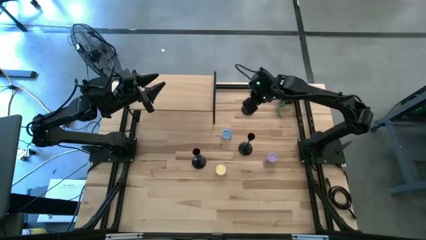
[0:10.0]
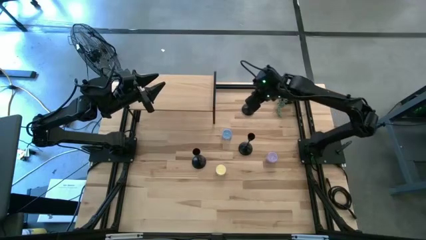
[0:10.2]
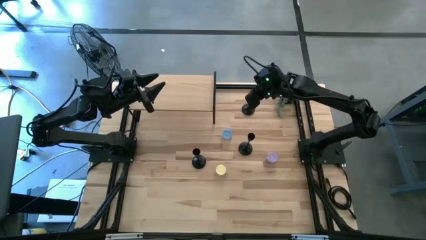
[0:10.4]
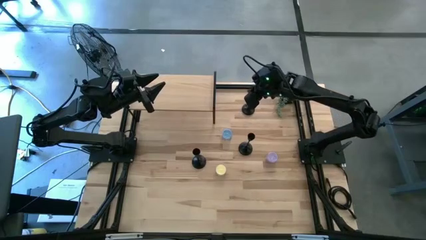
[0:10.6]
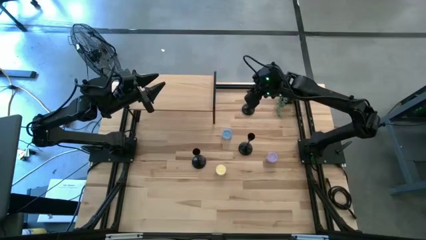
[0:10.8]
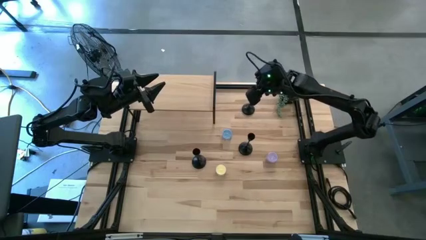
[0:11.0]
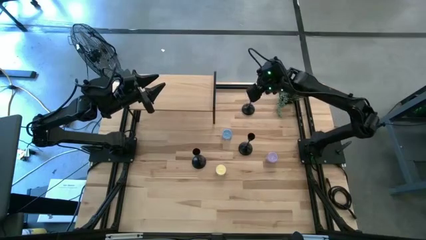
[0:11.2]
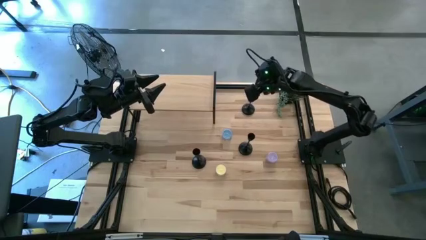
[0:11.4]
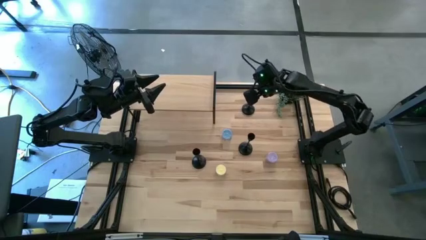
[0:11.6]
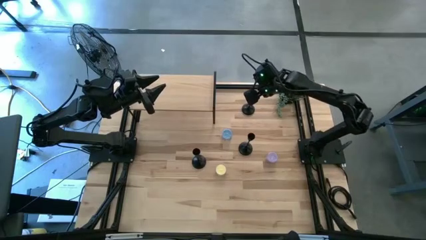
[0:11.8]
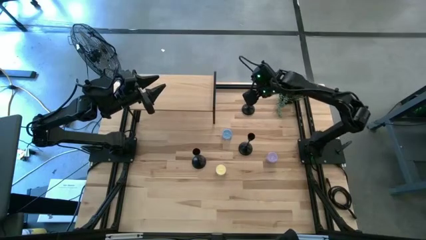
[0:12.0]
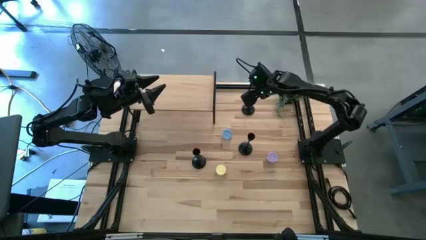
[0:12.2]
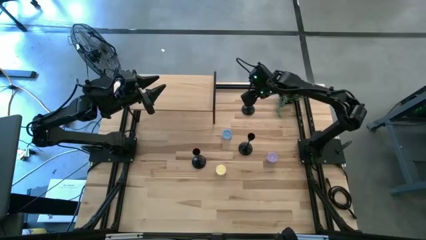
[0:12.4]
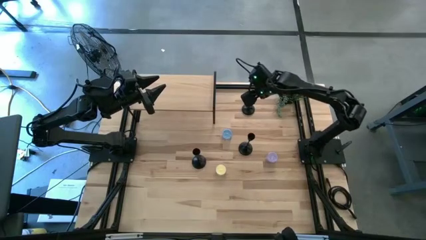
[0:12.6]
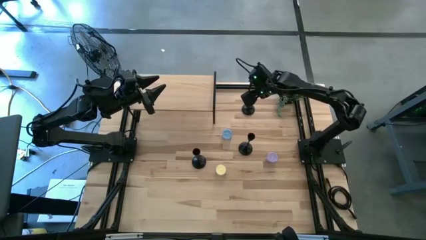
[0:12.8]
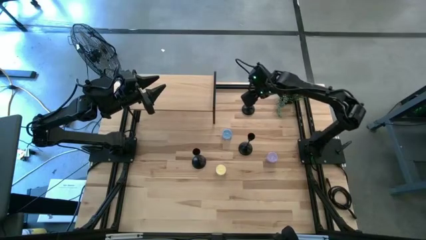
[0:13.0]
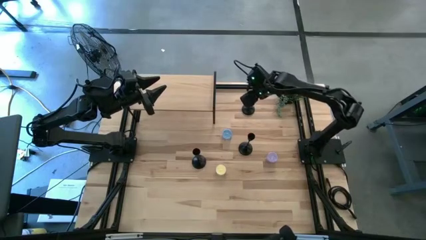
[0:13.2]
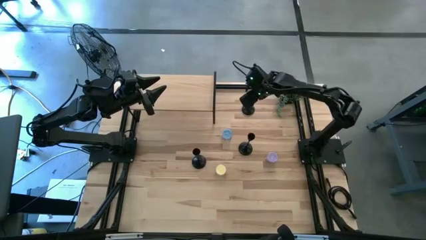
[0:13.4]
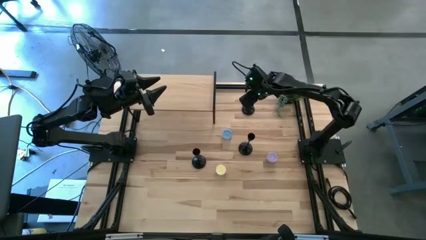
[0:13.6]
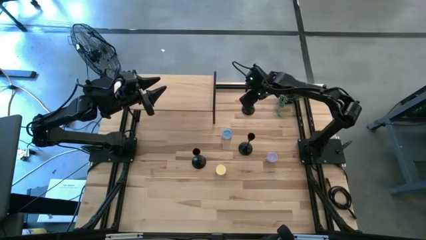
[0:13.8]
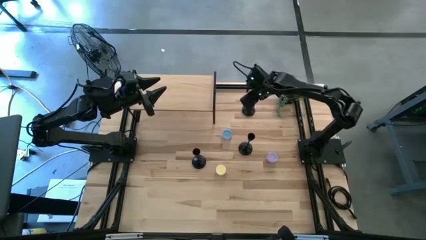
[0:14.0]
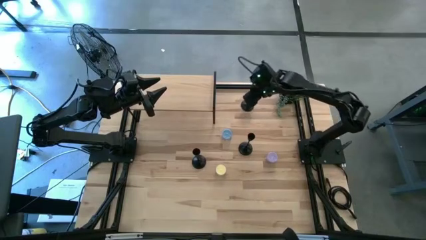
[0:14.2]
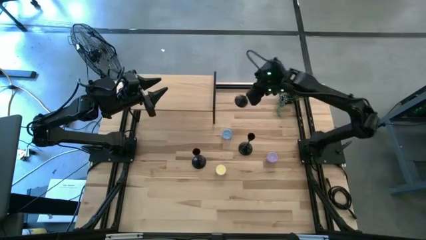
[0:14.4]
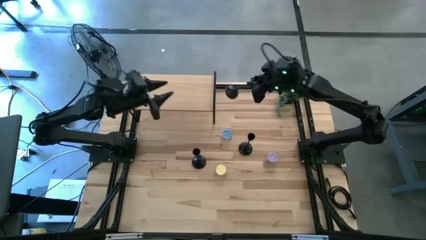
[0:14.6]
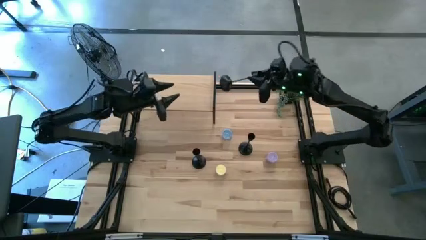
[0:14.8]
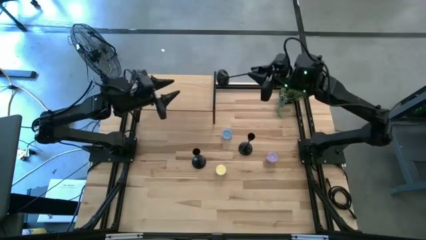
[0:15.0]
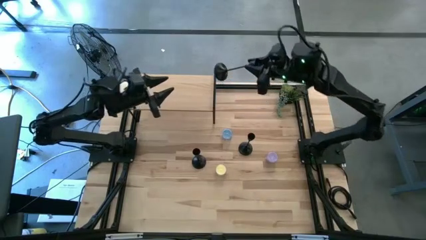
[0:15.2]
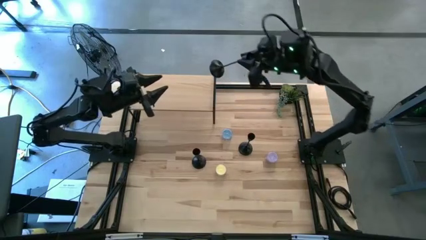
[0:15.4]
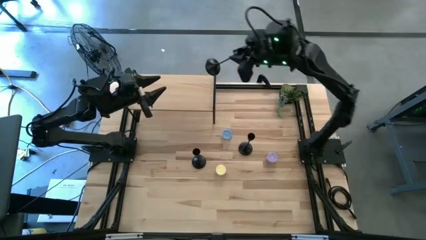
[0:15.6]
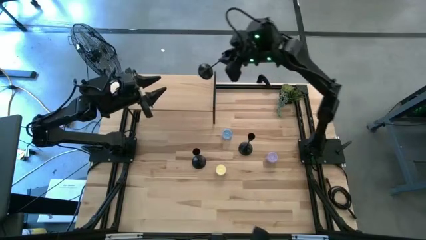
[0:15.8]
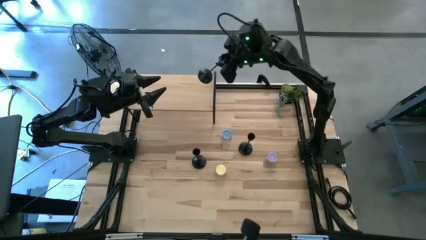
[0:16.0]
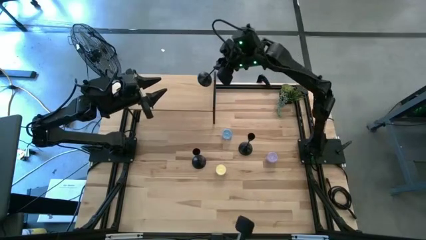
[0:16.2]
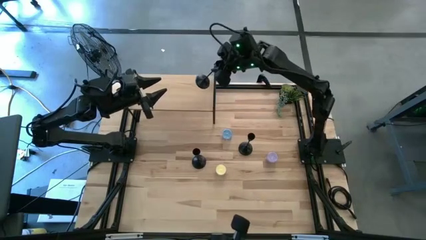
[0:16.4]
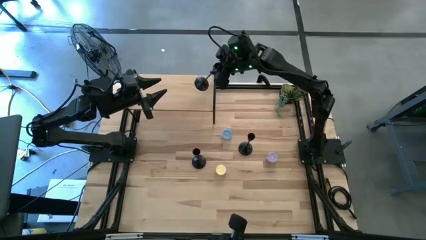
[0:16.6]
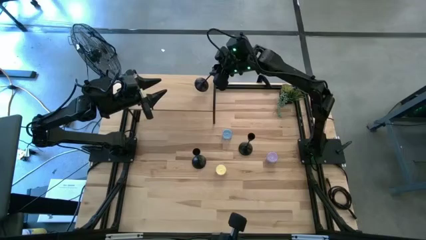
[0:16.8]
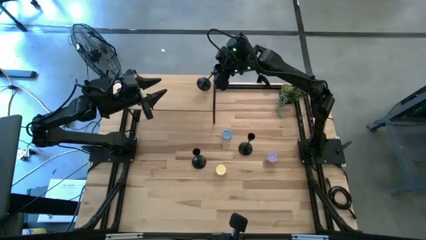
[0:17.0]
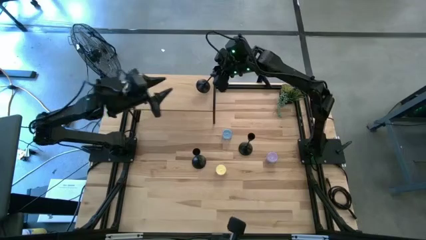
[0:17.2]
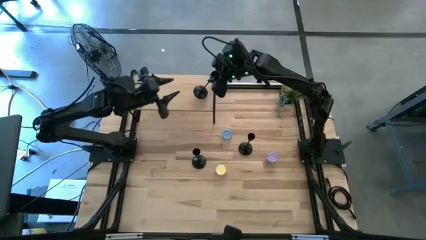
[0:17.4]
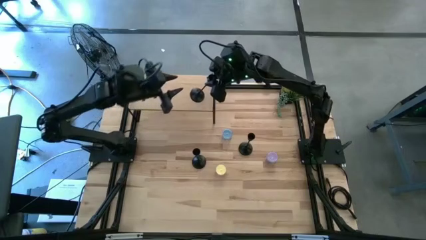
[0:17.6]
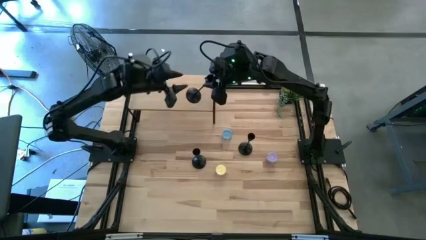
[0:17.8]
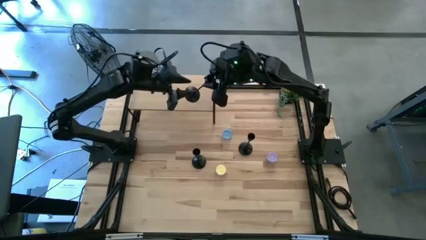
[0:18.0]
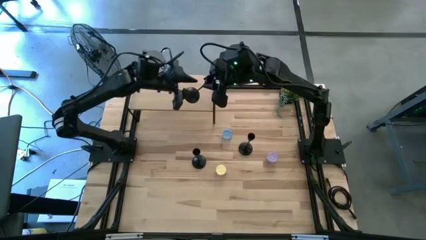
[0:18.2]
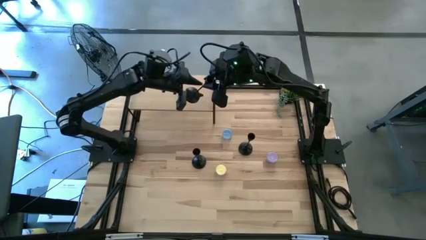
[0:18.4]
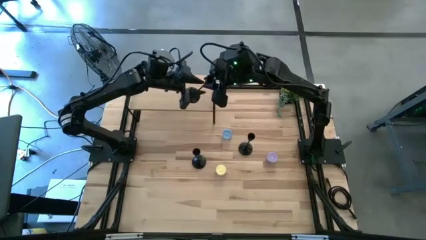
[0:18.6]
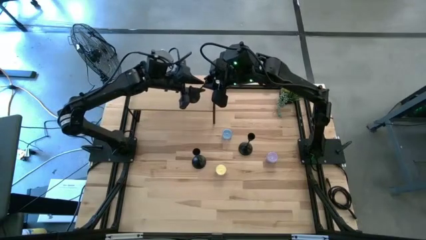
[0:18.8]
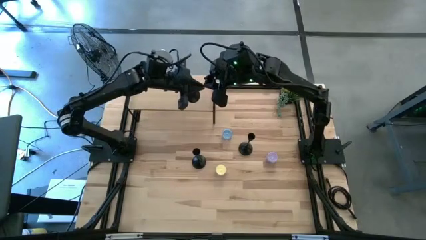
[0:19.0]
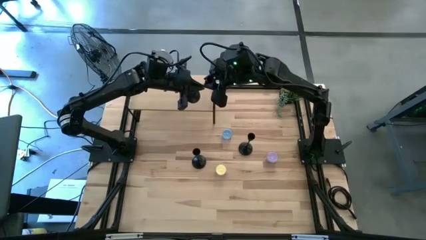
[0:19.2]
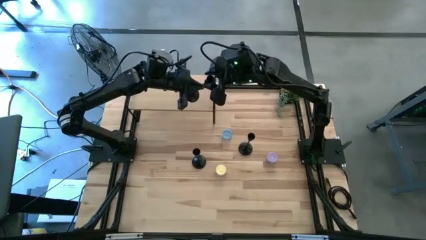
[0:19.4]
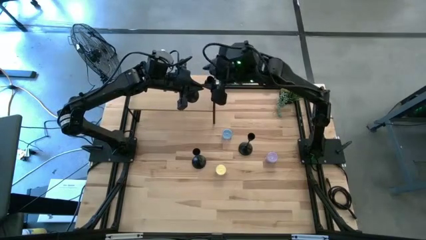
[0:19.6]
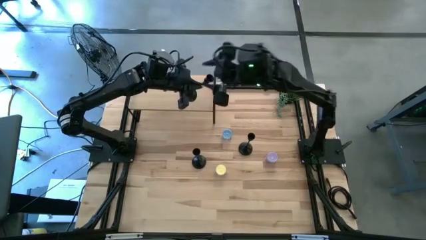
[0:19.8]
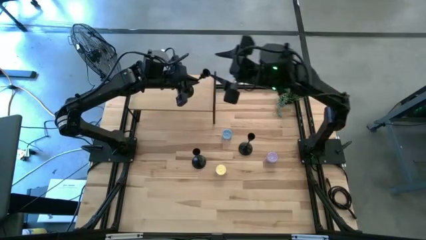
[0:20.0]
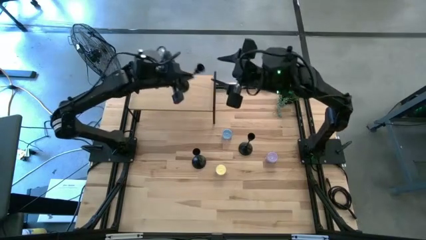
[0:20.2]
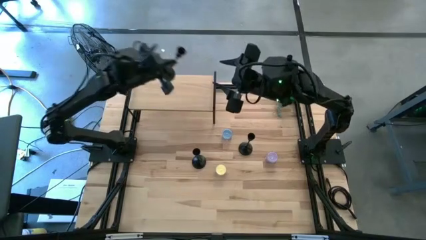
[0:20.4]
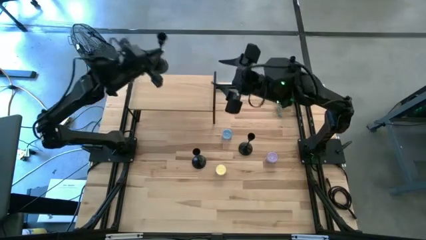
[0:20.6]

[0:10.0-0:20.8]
Task: Pick & Place candle stick holders
Put the top black candle holder on the shelf

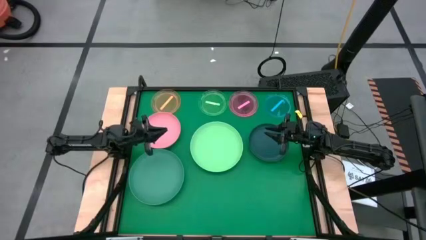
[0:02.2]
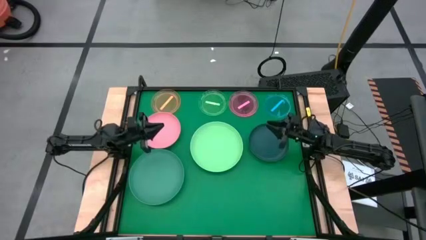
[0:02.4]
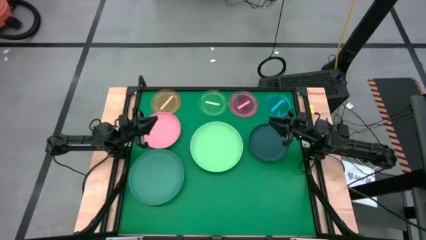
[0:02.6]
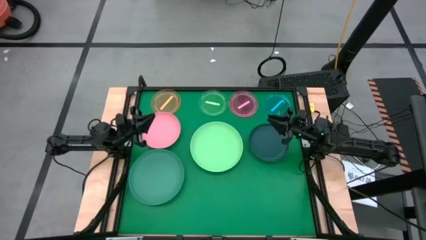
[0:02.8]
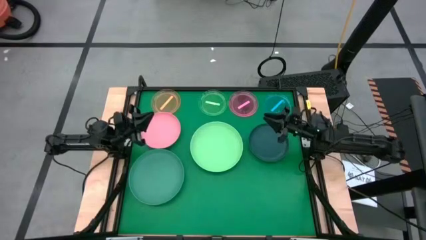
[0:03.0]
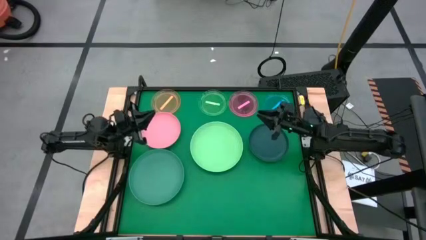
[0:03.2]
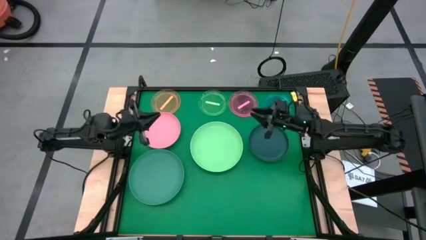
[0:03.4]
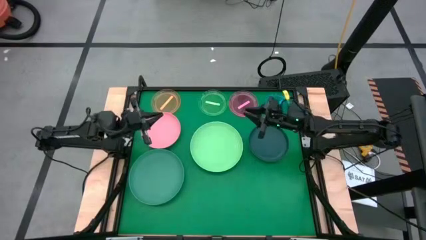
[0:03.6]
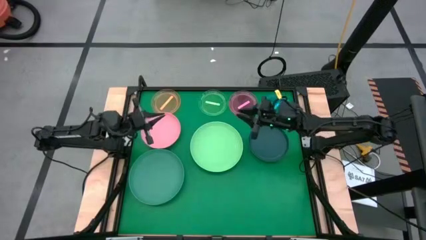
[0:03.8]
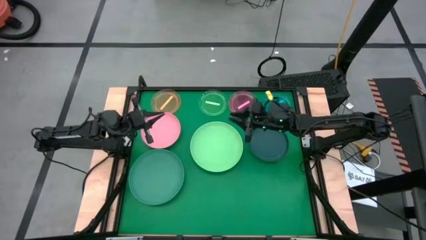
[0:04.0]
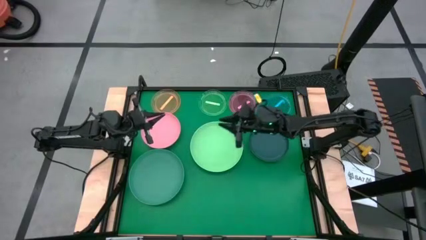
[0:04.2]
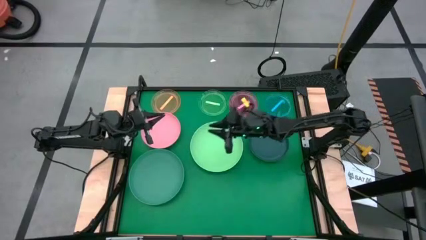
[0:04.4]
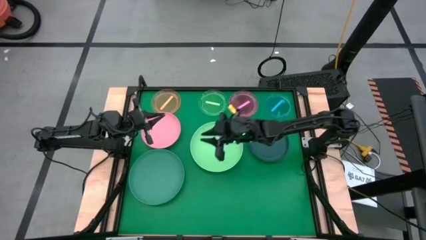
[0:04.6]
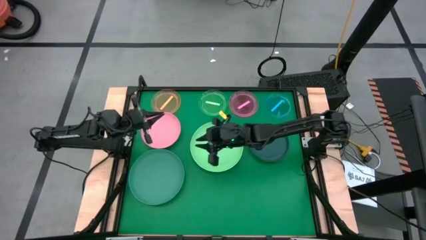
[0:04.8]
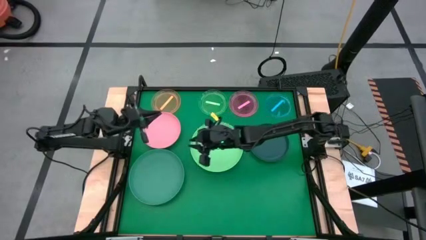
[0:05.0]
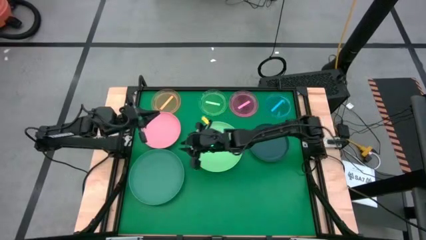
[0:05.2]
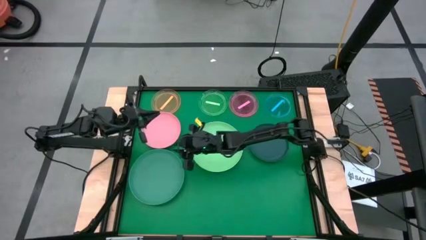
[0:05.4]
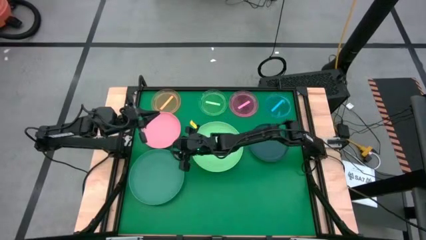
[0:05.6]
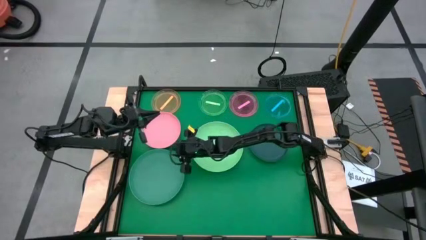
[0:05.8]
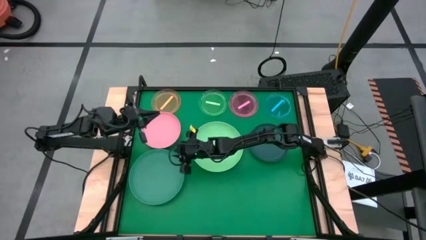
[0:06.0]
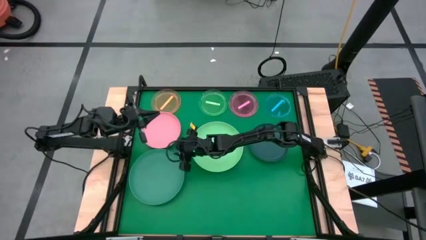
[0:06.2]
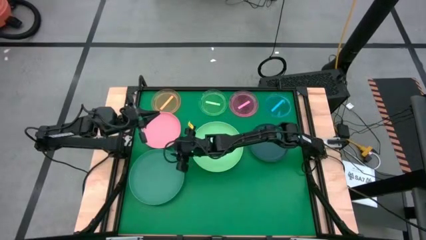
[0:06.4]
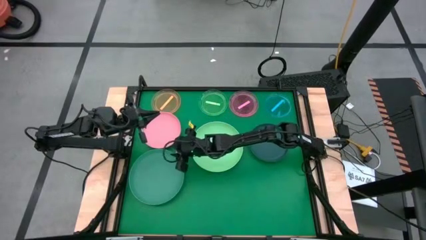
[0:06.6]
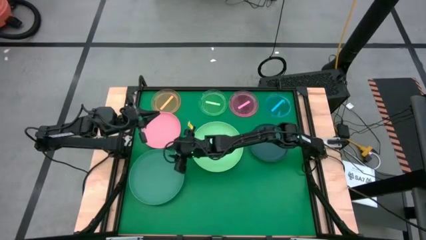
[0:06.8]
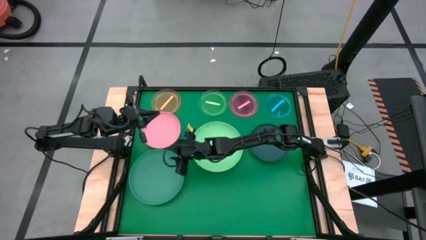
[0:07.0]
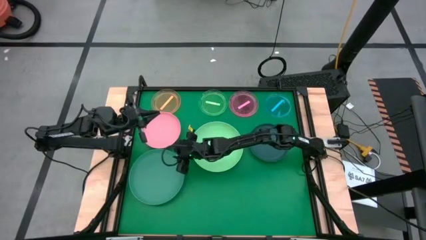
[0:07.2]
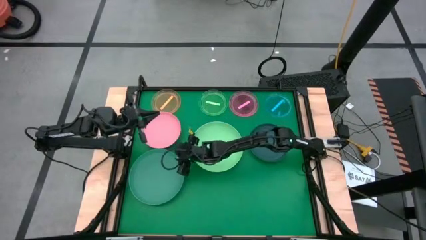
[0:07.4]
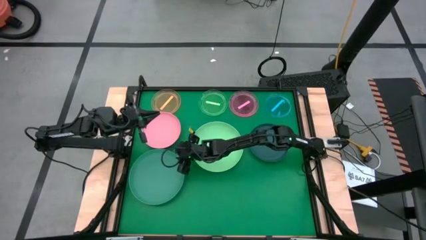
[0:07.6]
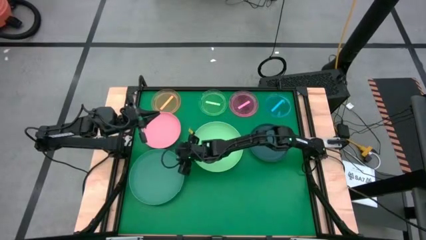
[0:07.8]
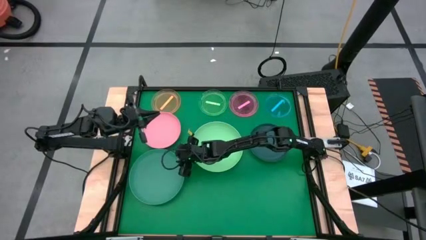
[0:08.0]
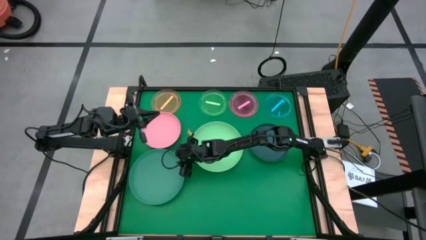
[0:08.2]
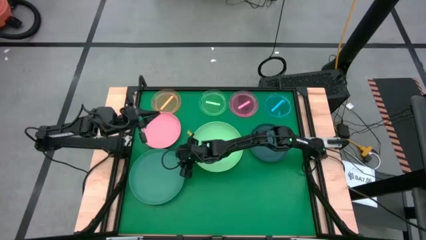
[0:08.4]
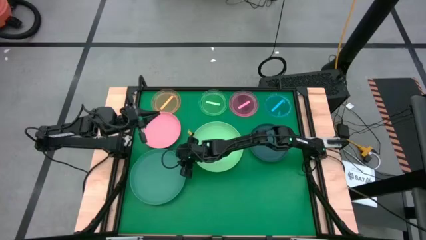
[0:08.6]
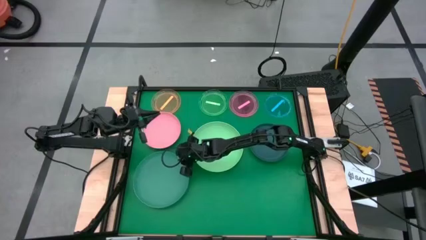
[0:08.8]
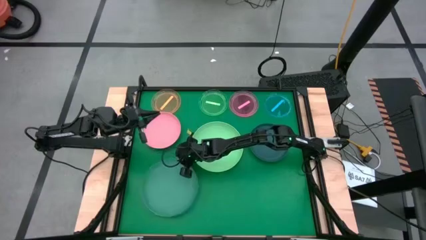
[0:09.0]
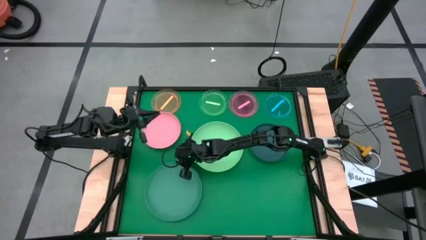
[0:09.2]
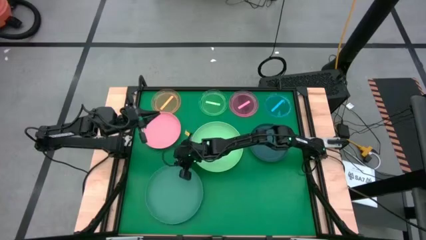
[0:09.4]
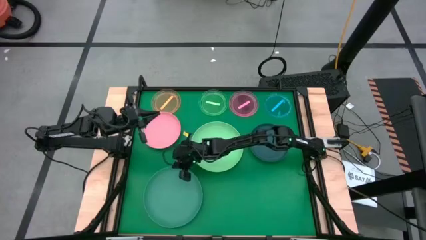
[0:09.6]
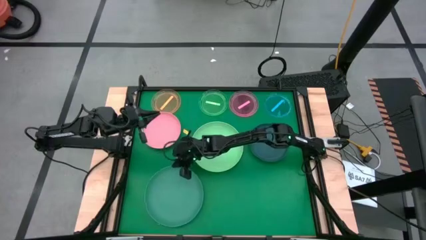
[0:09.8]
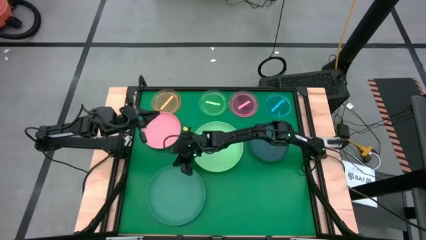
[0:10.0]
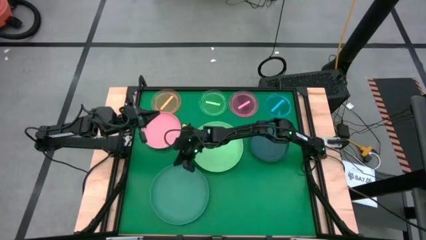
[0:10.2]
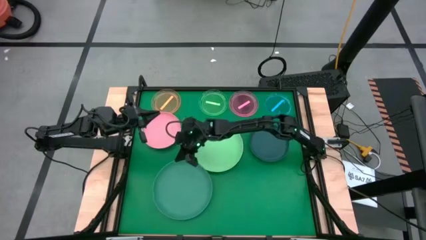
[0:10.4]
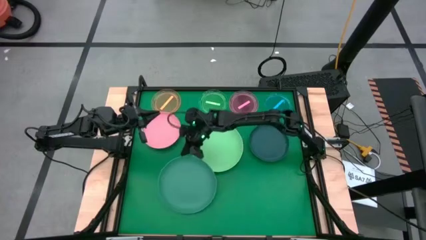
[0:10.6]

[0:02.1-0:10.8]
Task: Stack plastic plates
Stack the dark green plate on top of the green plate
